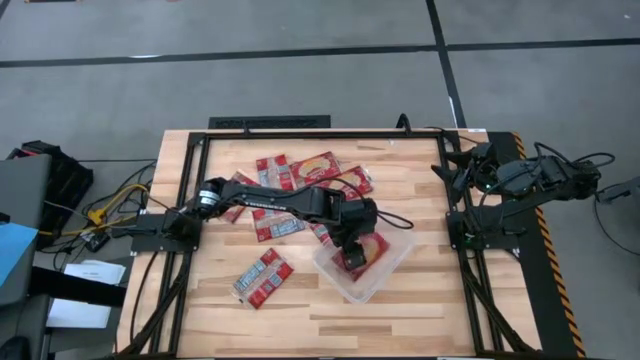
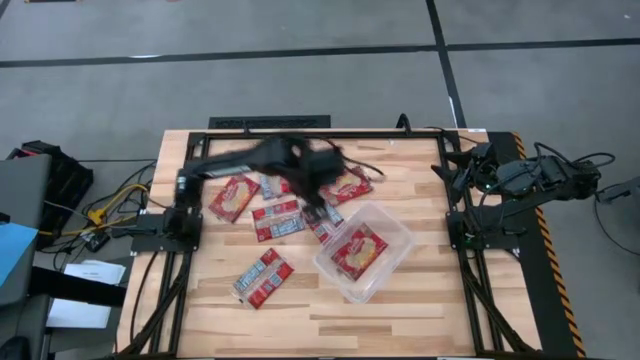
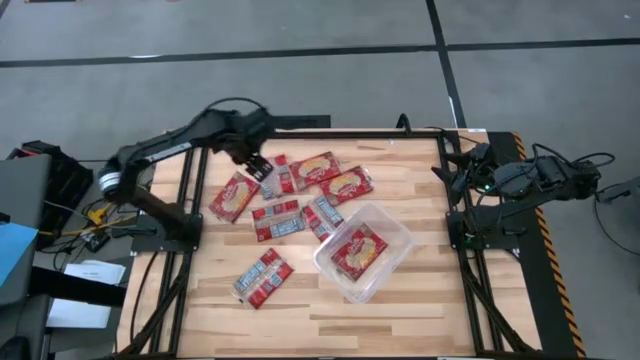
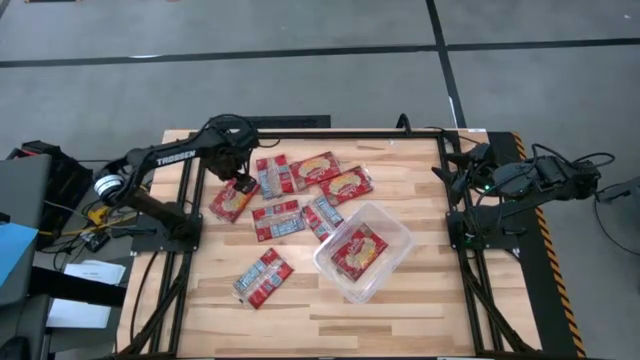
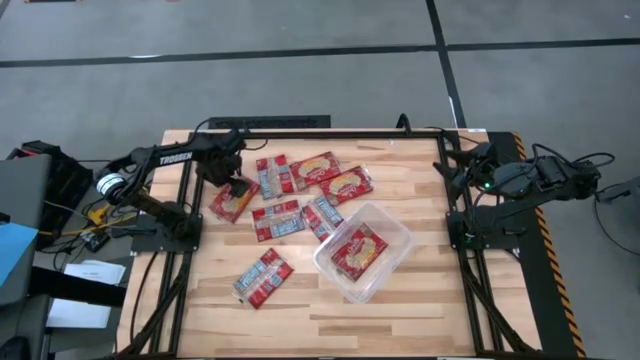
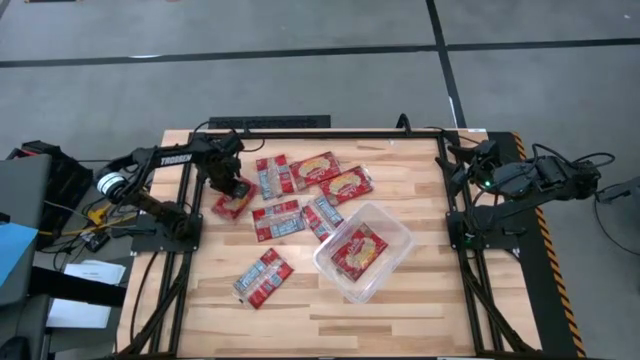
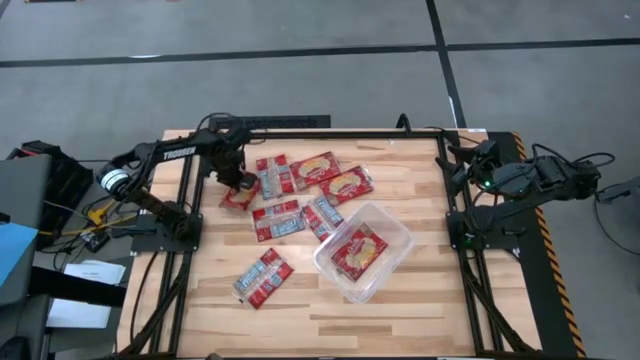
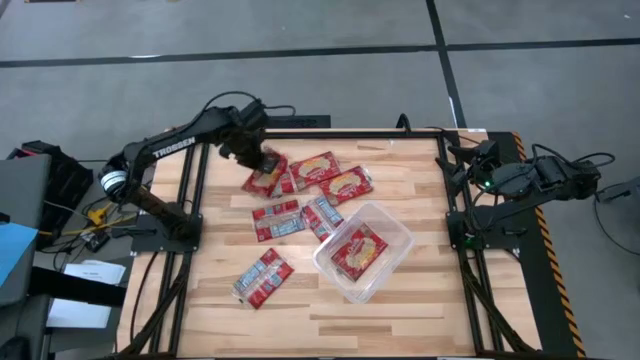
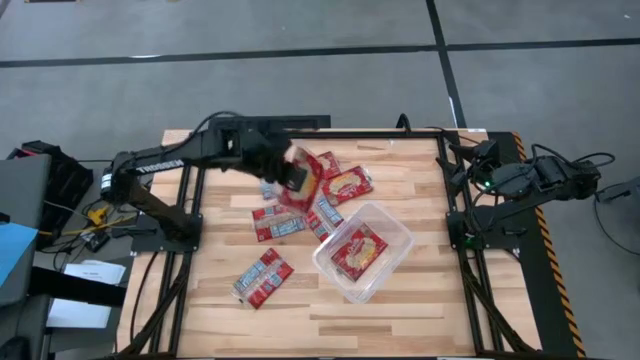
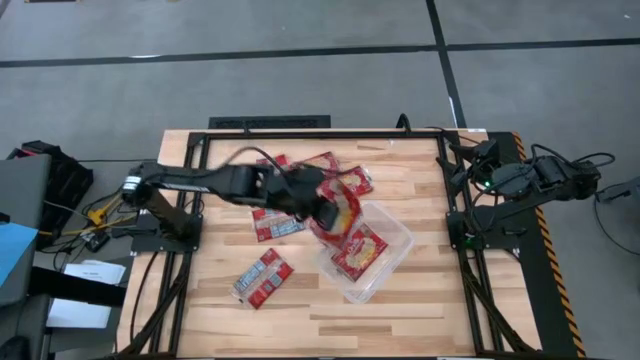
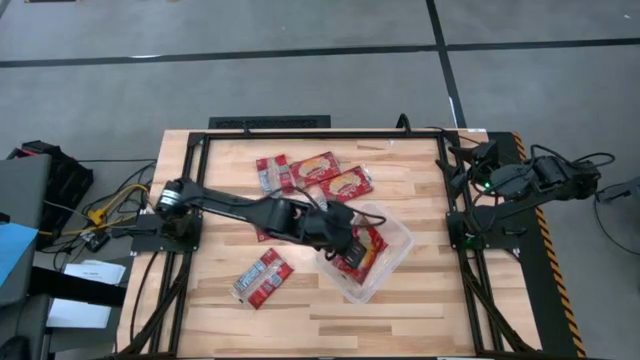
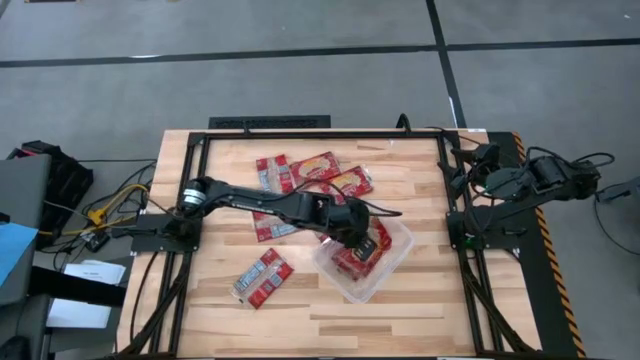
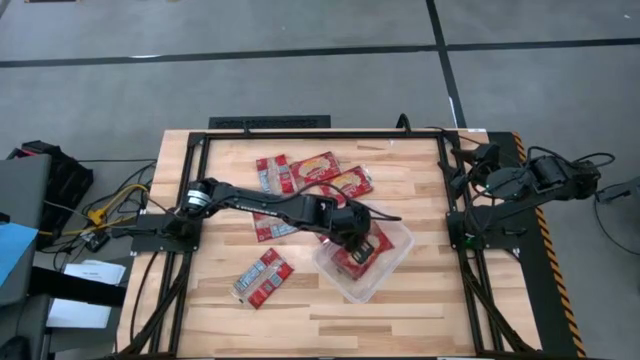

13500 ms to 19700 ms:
Task: Sort popcorn bags into baskets
Put the red popcorn pack into the transparent container

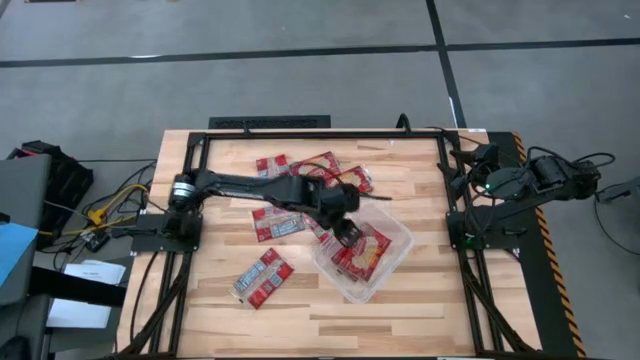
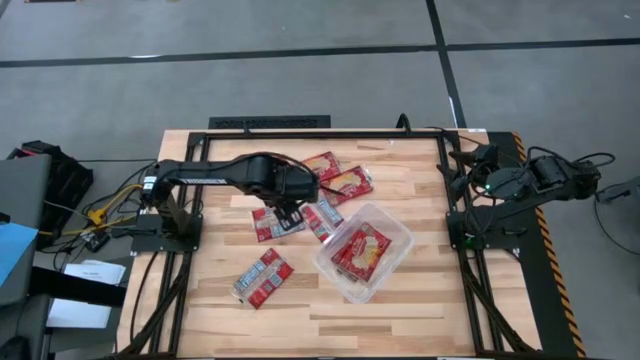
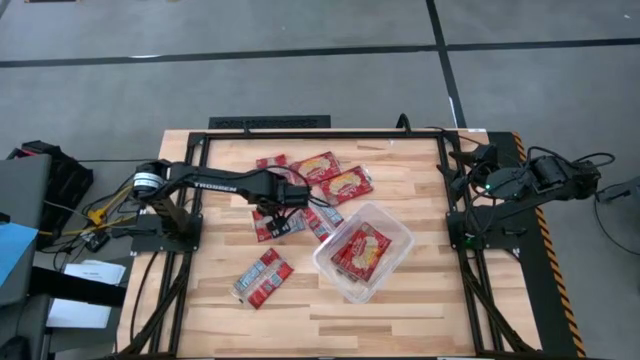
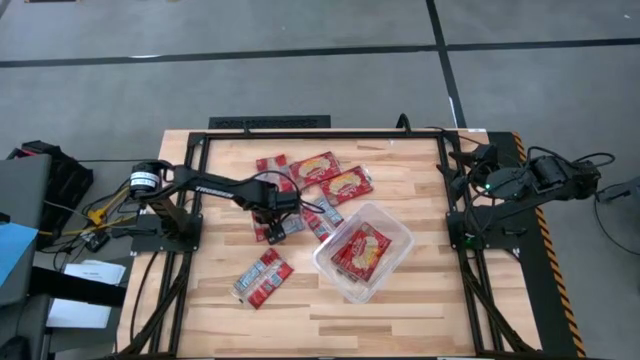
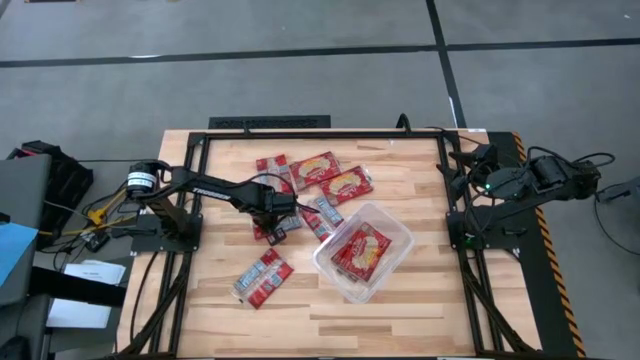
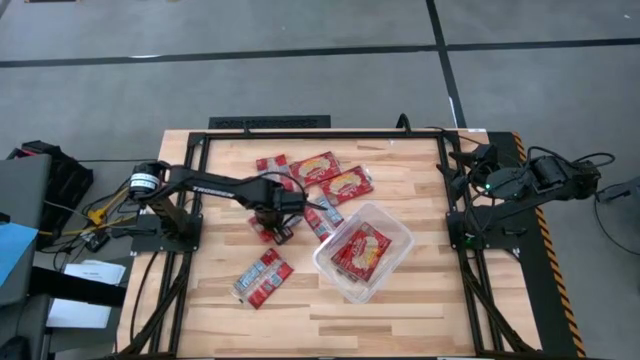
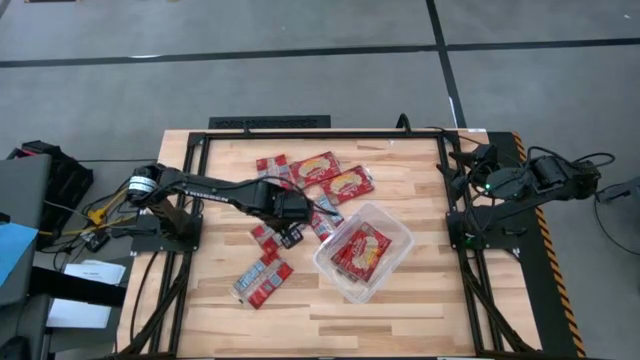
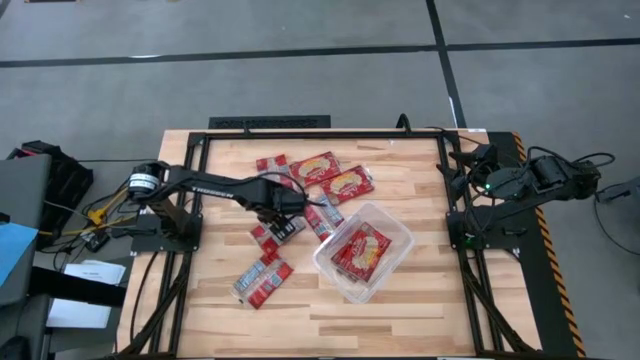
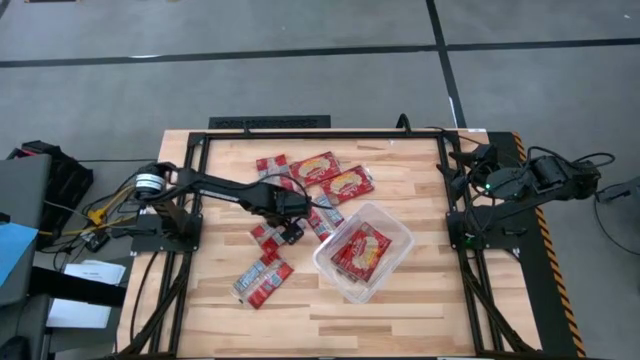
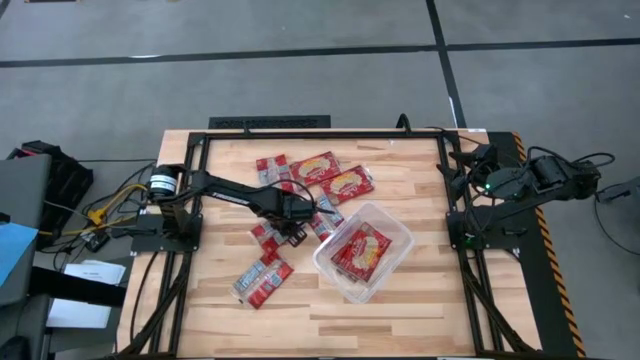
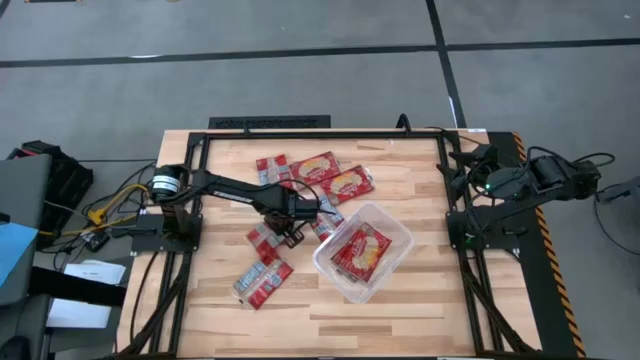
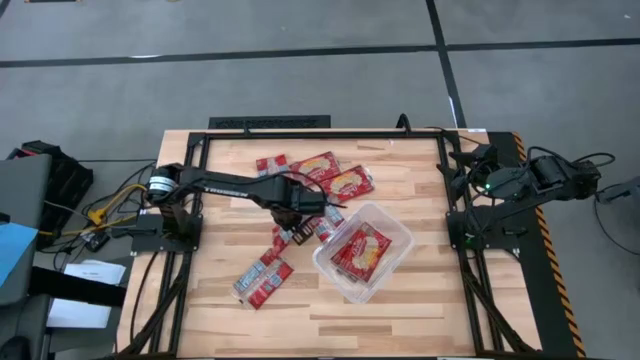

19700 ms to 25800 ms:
Put the red popcorn pack into the transparent container

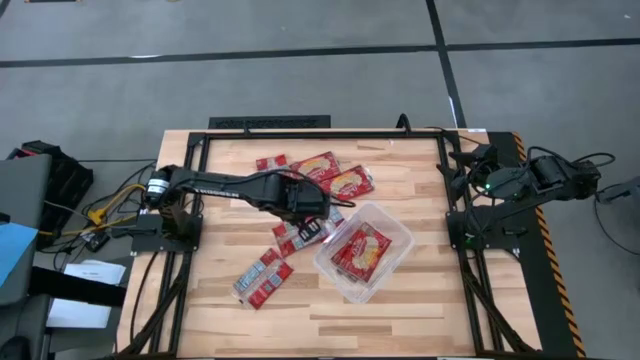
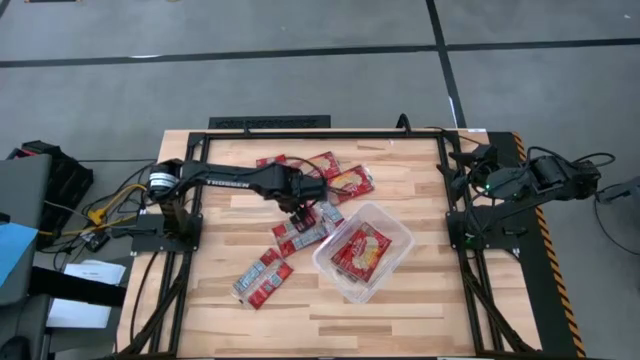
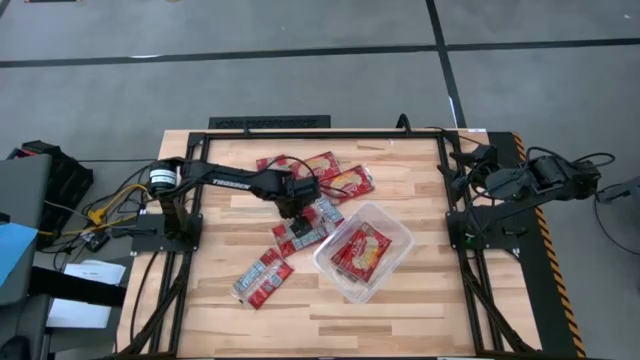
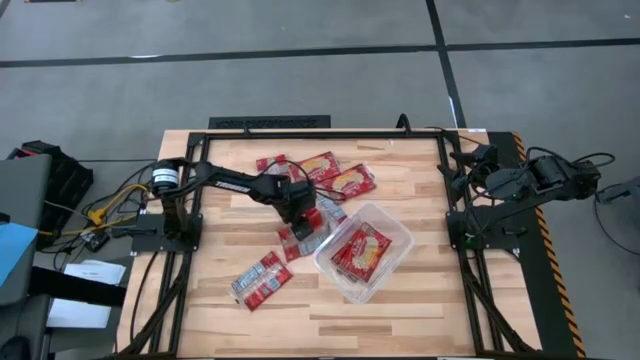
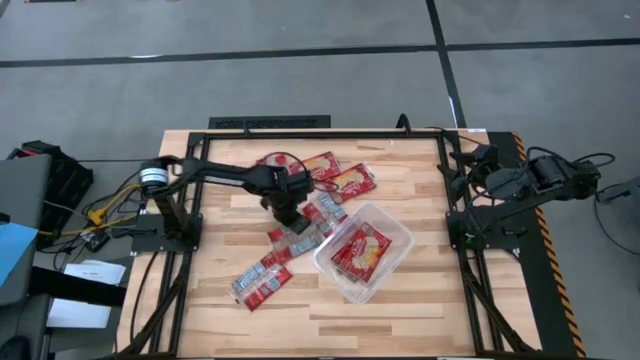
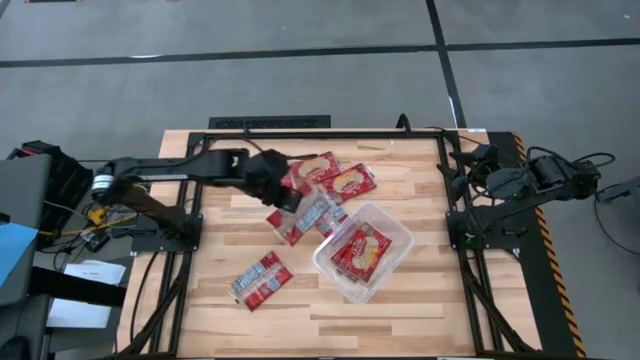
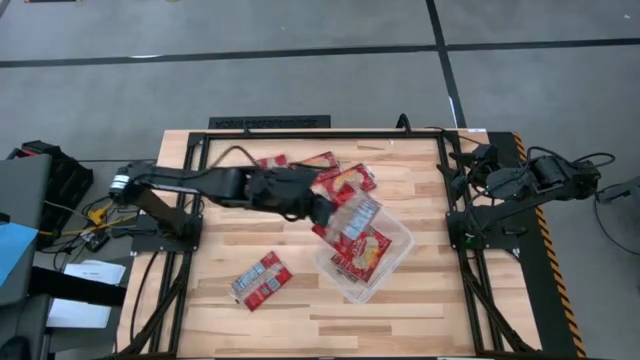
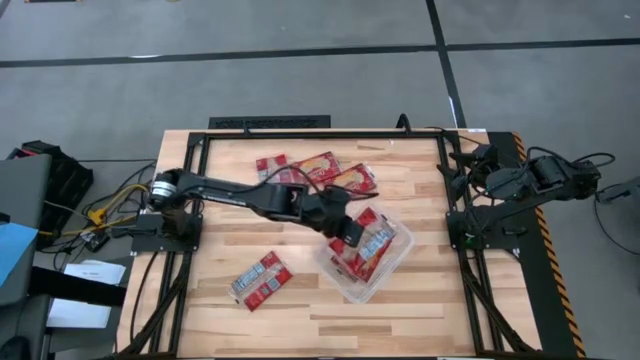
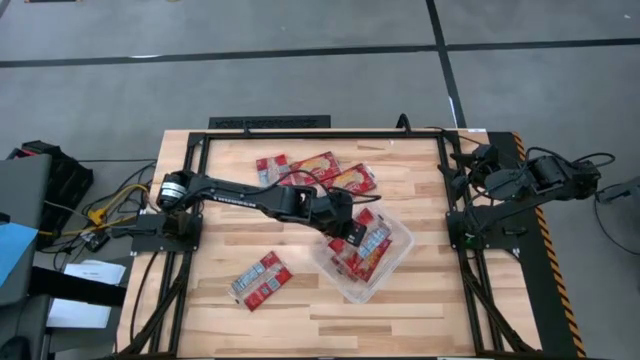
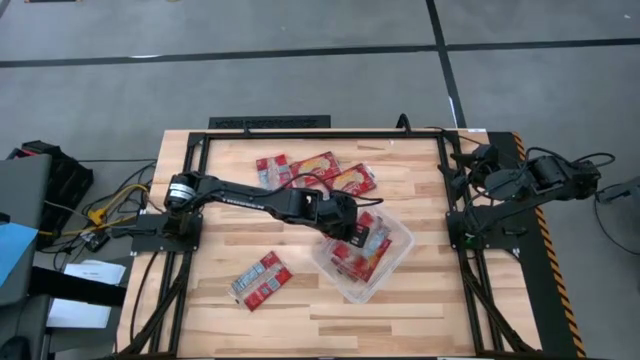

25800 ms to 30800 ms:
Put the red popcorn pack into the transparent container

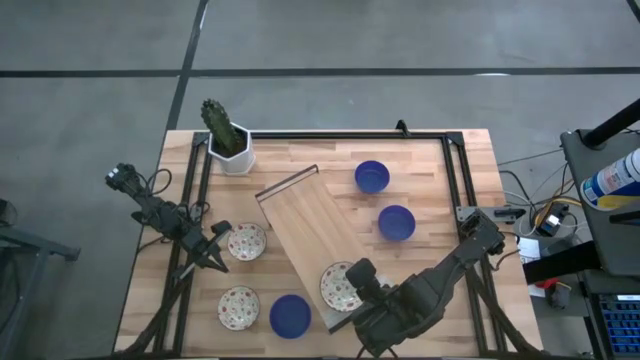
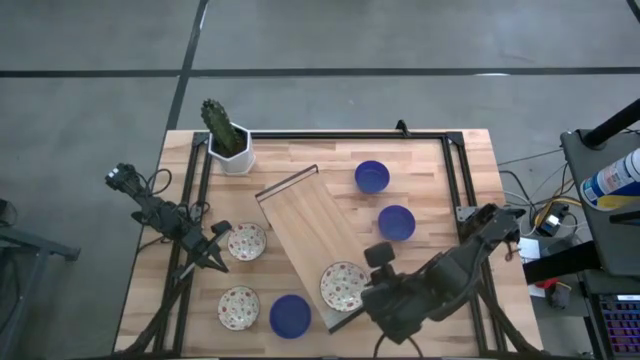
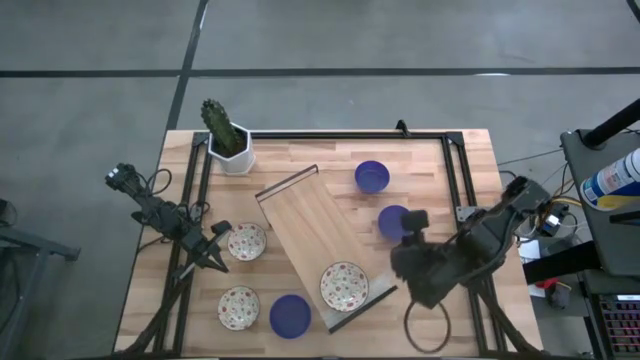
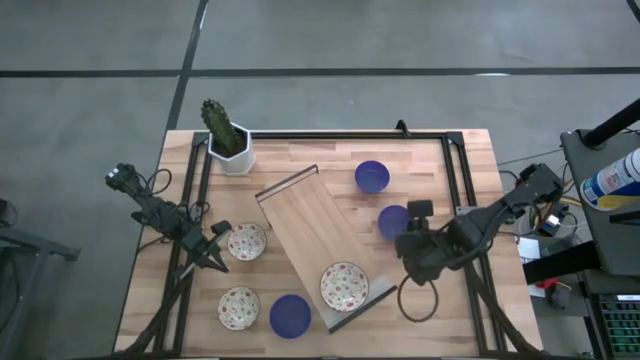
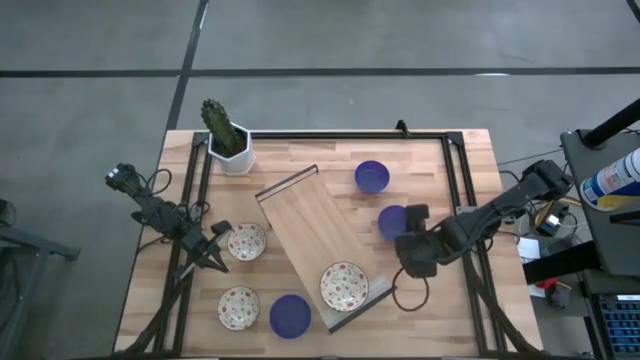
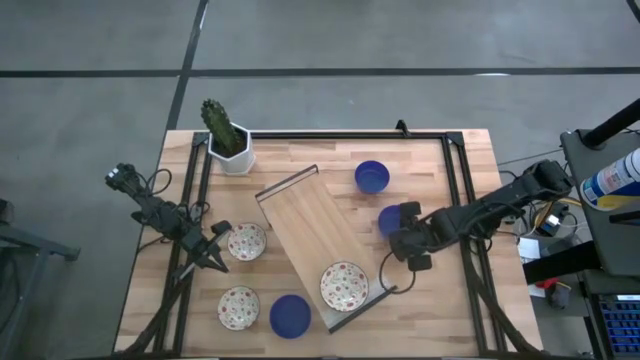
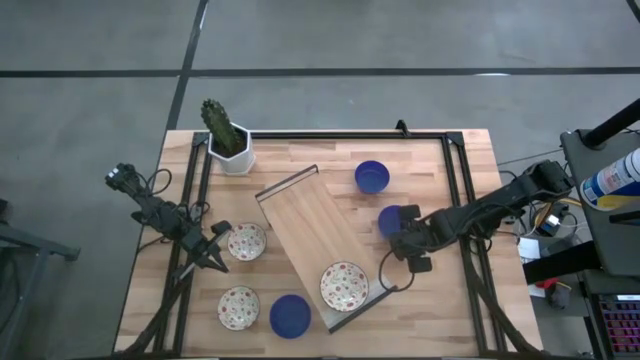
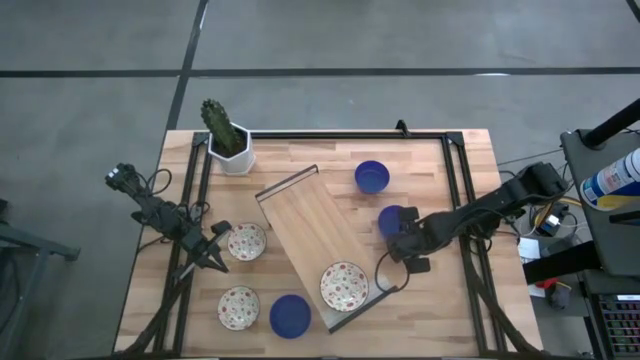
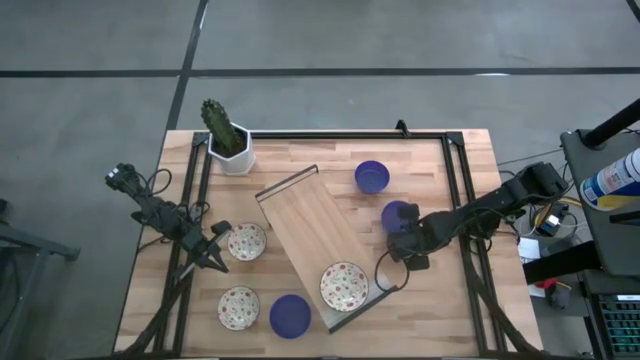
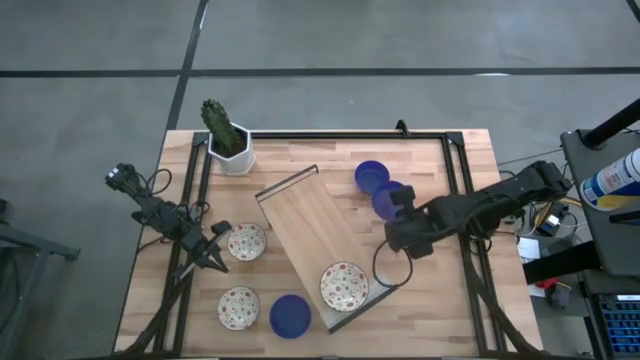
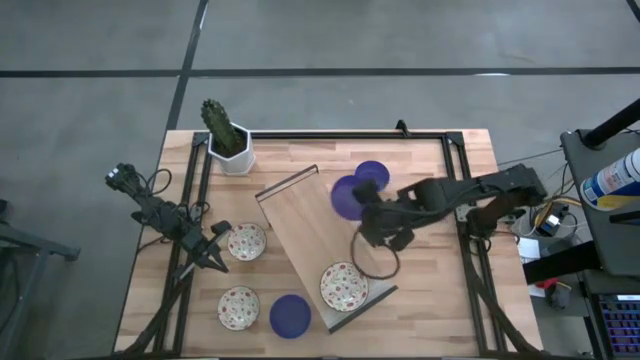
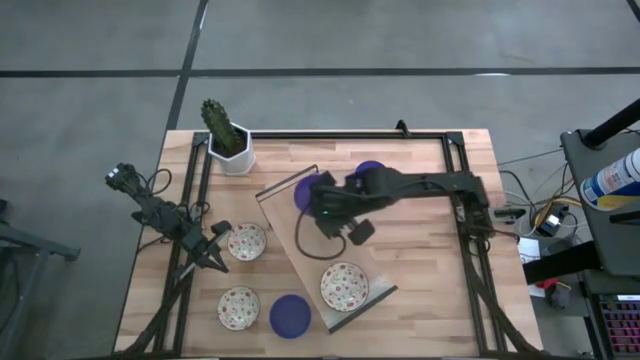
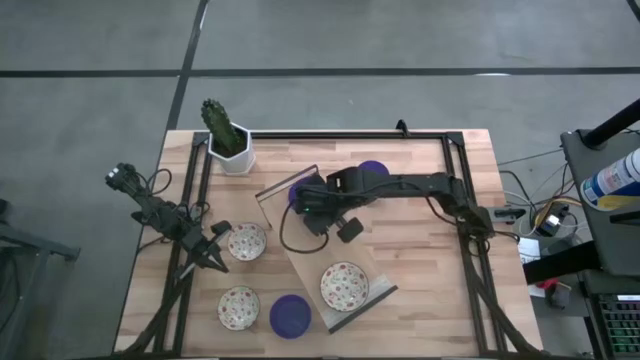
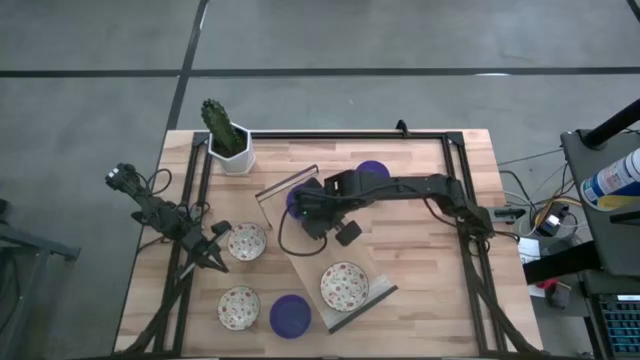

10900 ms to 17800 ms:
Task: Pick & Place Mini bowls
Put the middle violet bowl on the shelf
